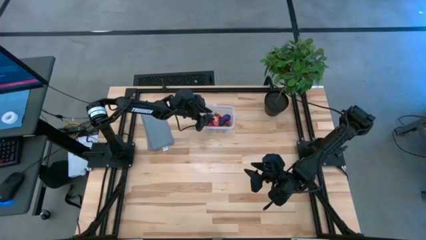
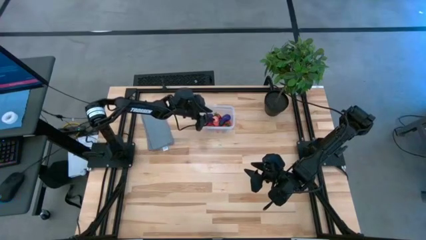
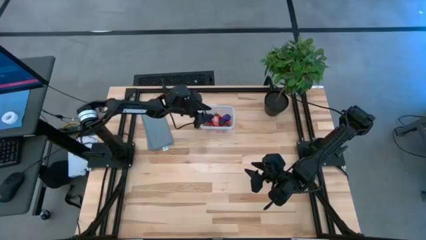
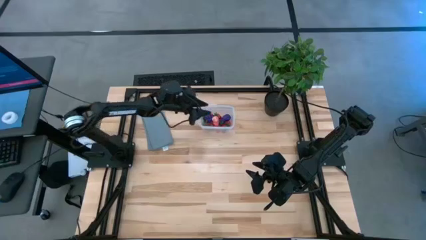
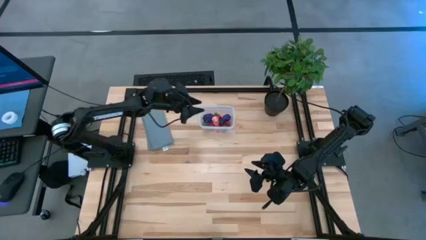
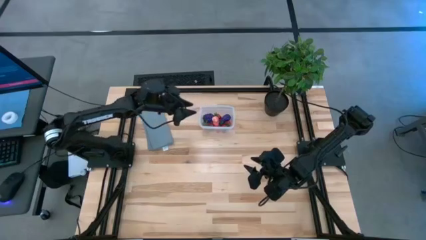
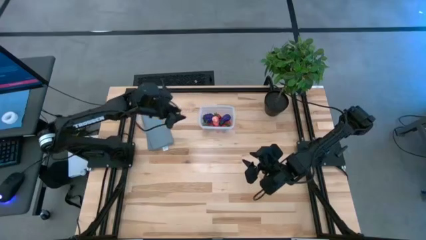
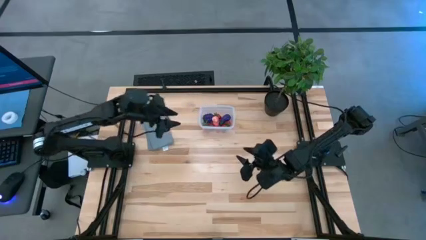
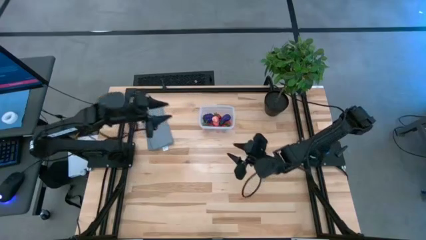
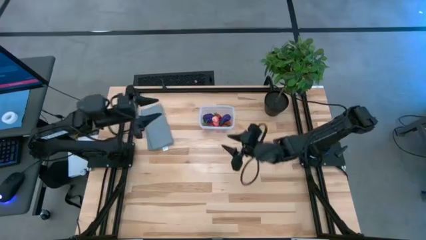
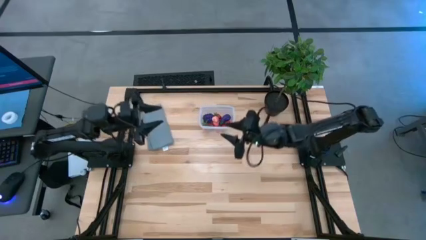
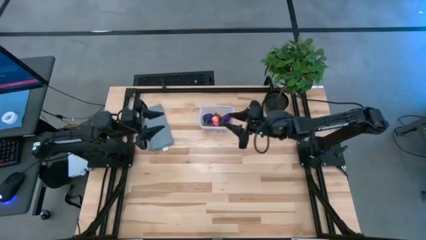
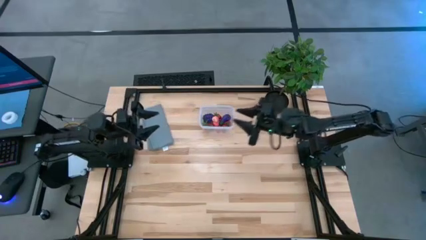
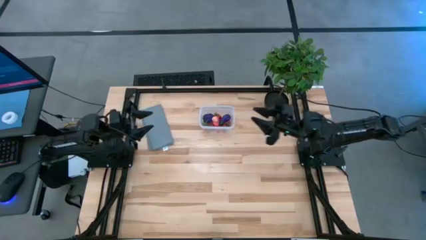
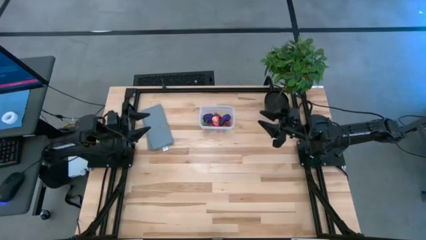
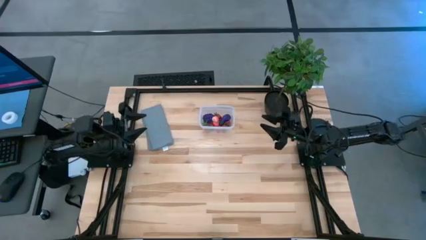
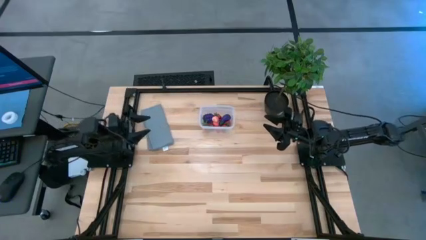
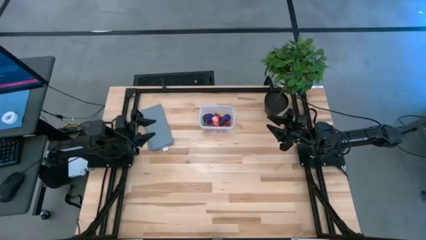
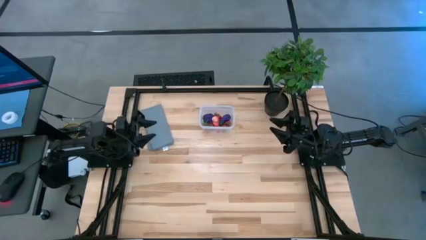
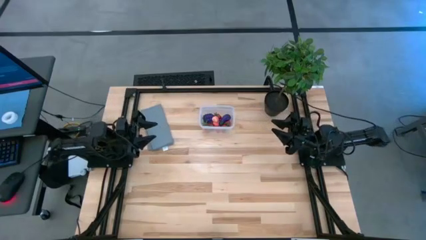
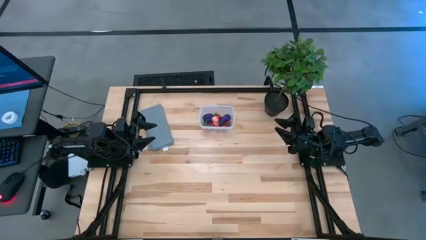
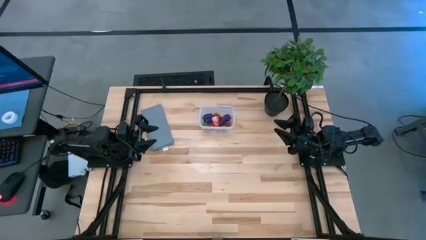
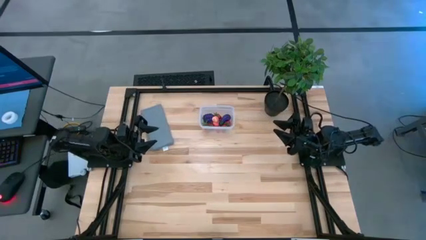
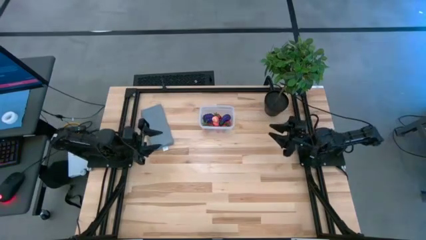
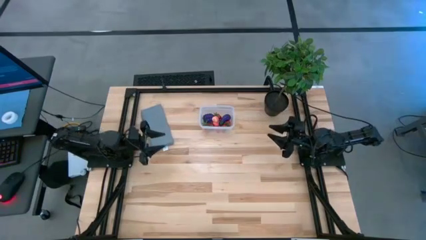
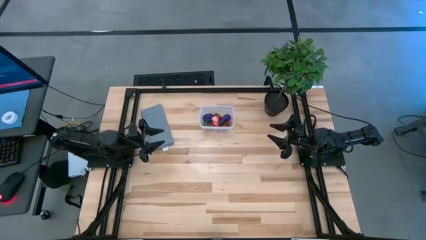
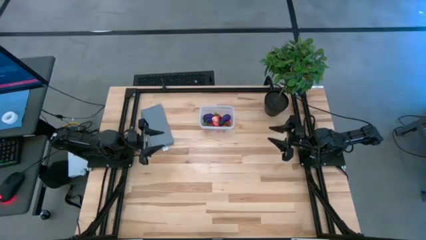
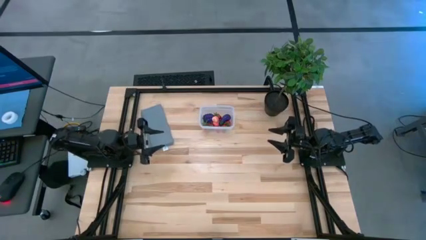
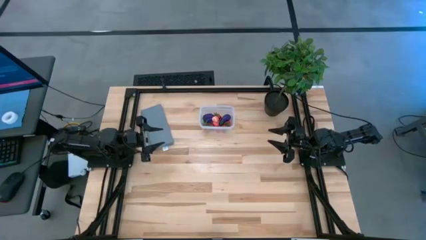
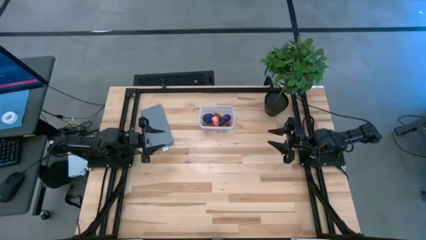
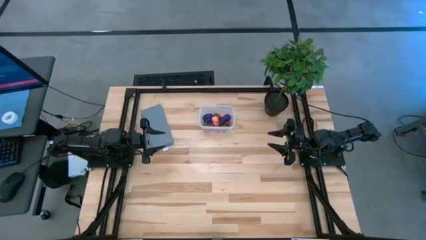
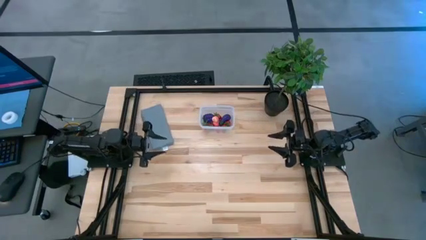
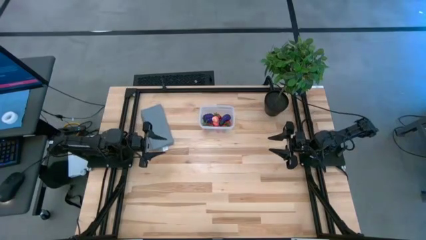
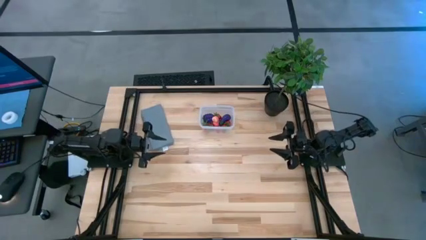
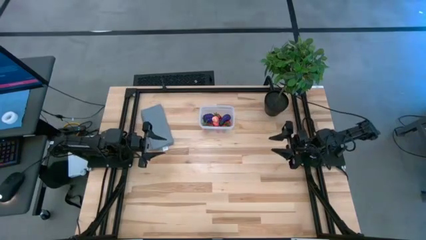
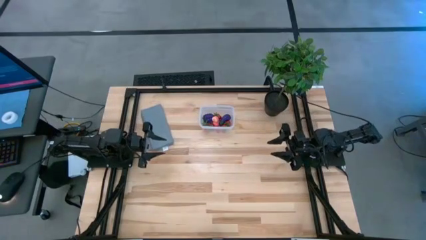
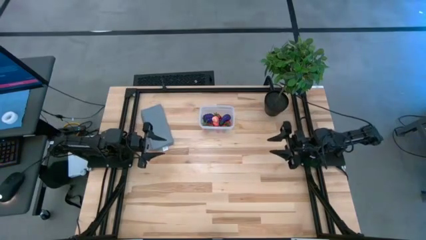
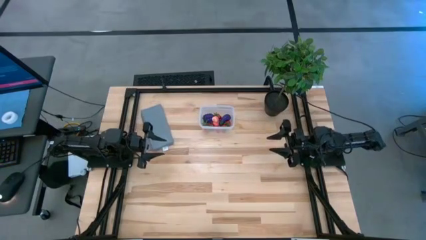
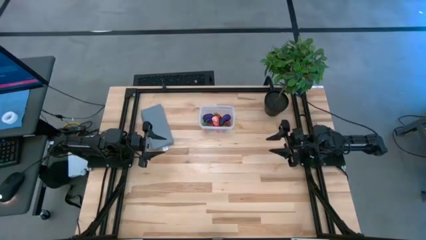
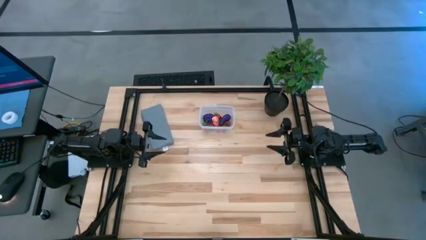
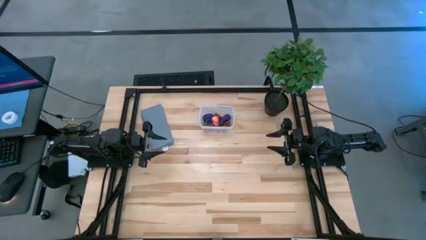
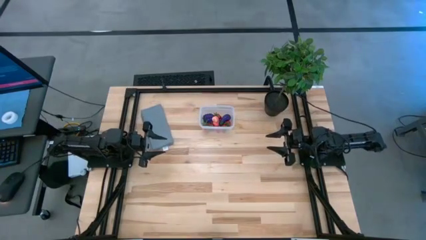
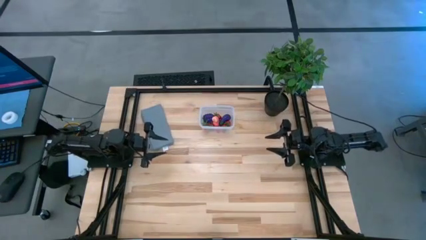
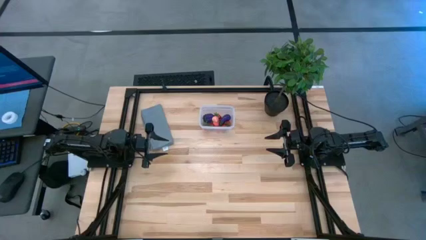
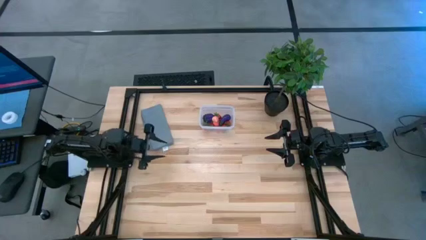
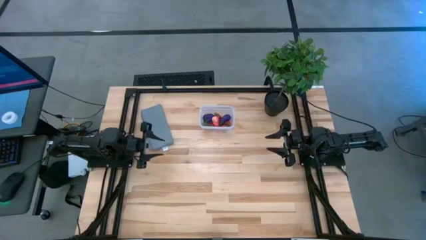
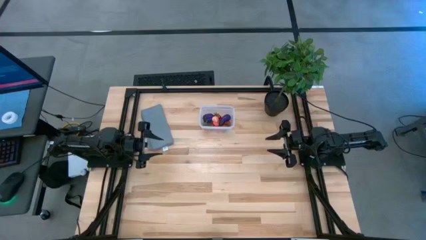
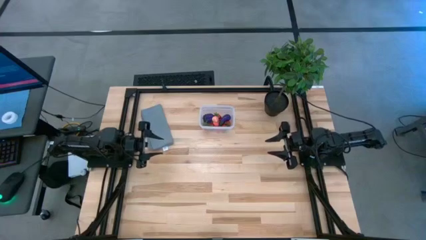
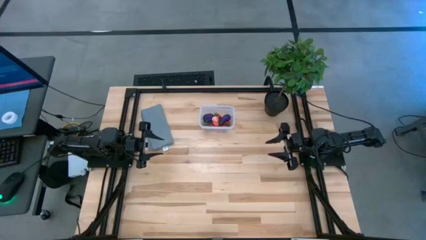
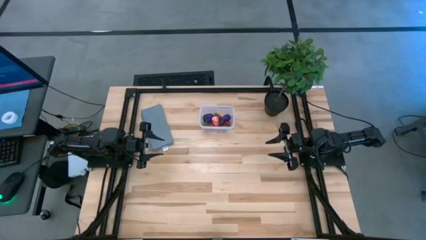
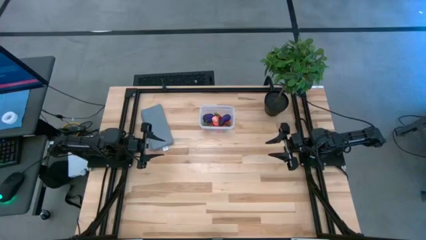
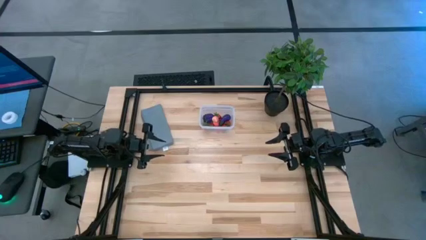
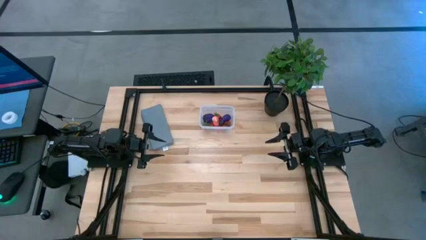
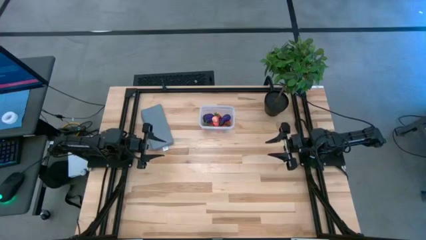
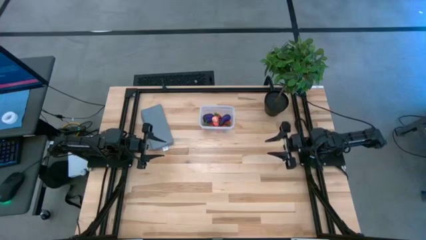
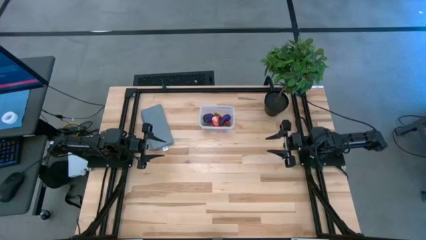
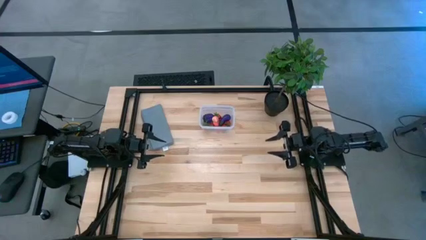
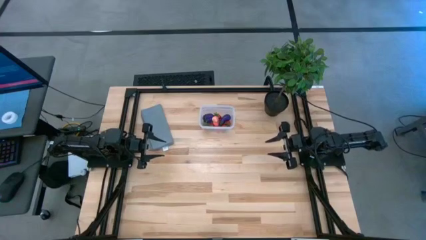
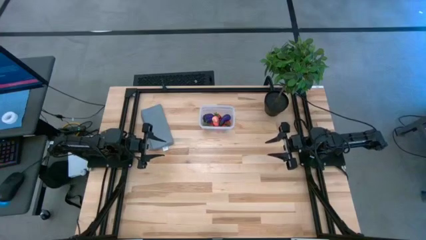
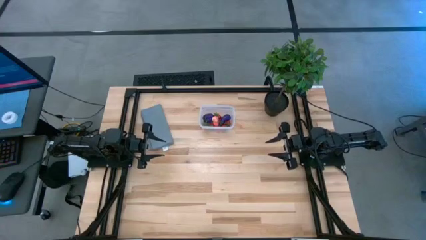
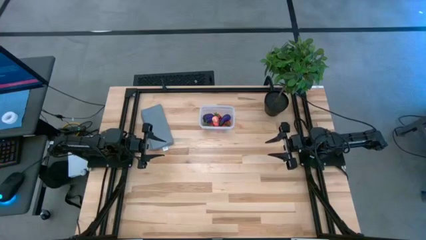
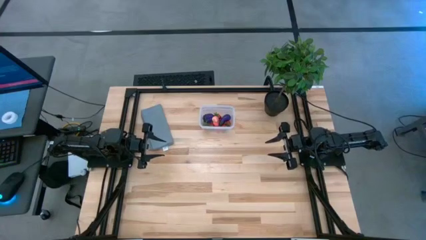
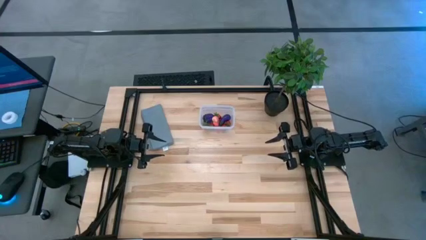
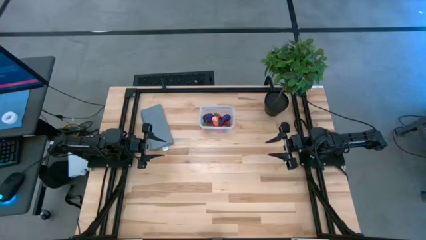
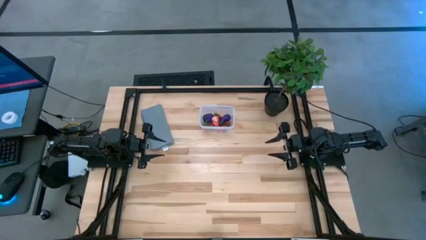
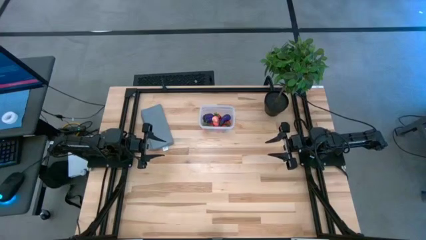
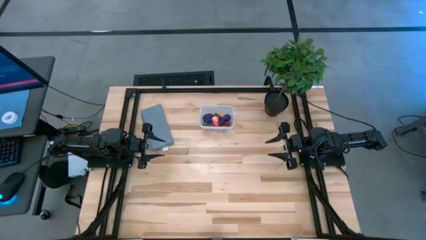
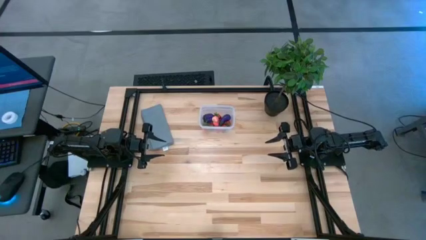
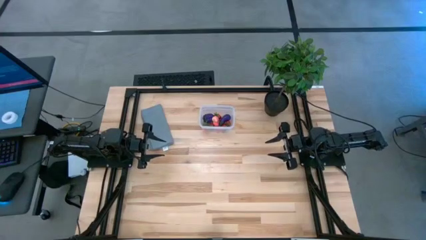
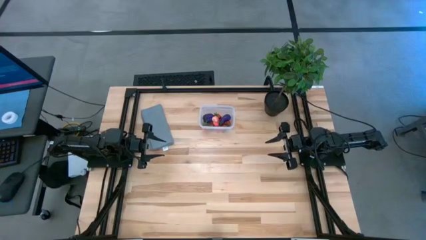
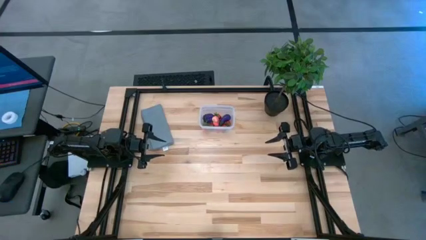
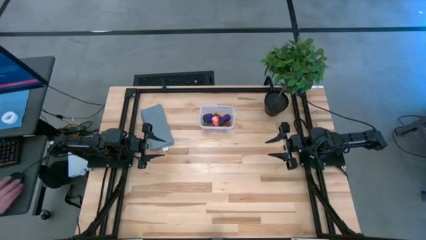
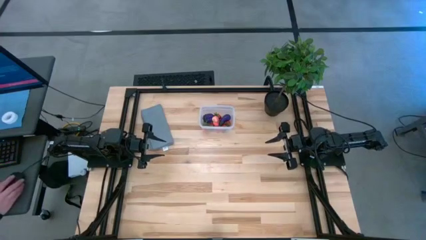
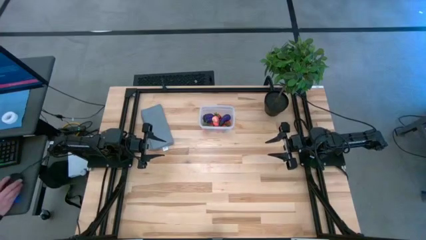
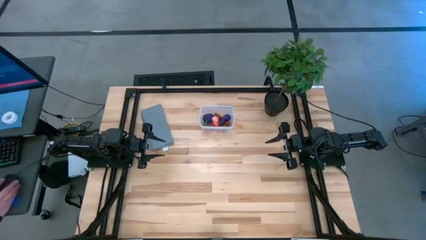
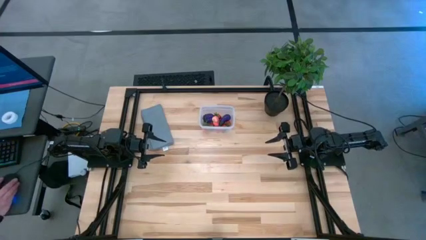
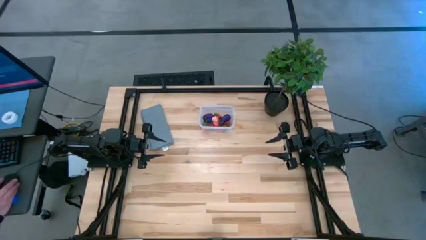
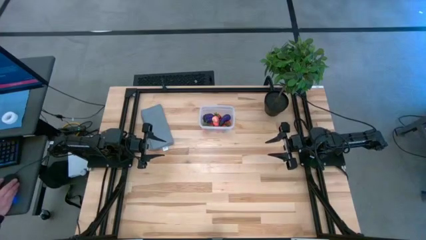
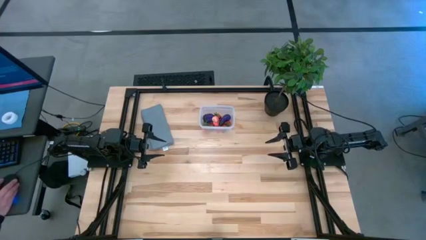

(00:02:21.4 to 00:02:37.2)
Task: Pick and placing Produce into tupperware
Return to Home Position

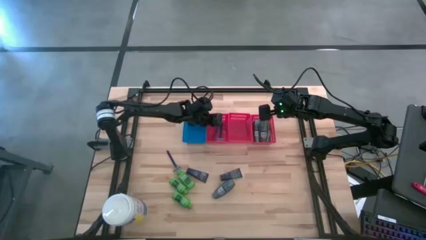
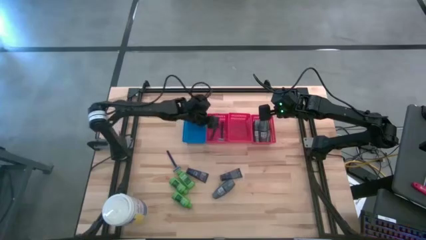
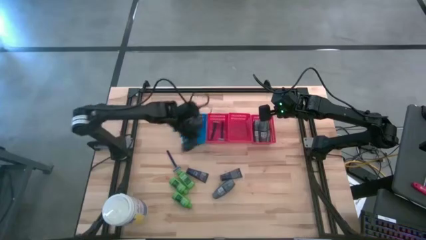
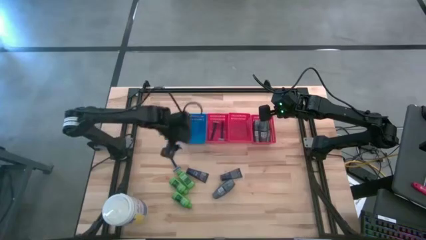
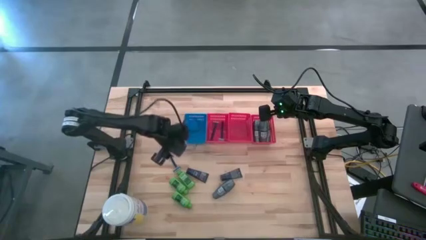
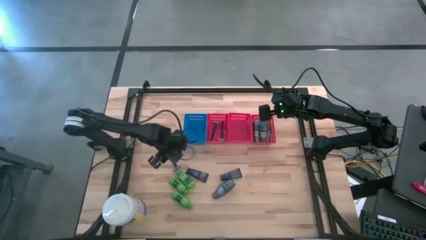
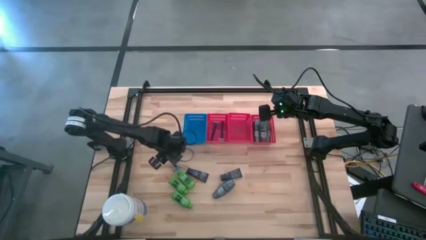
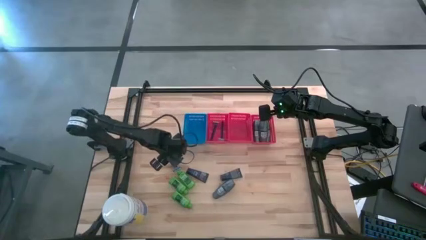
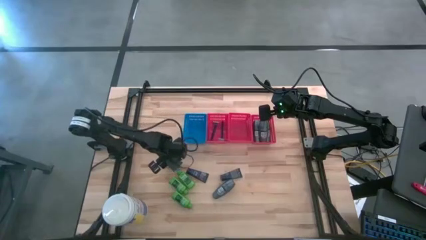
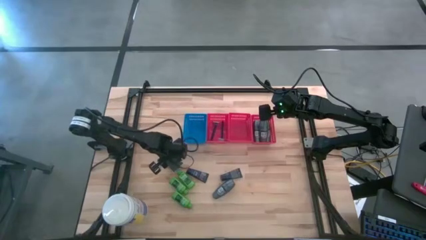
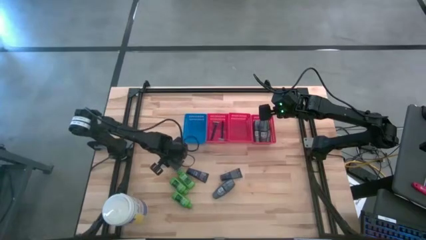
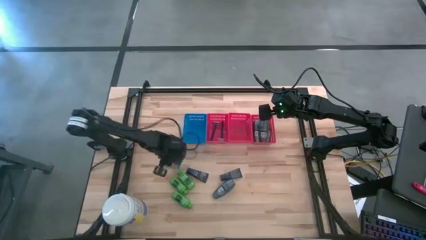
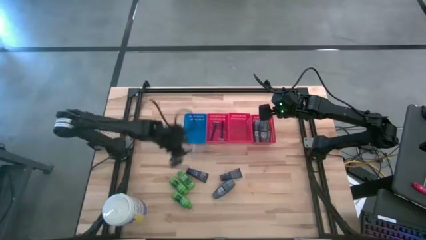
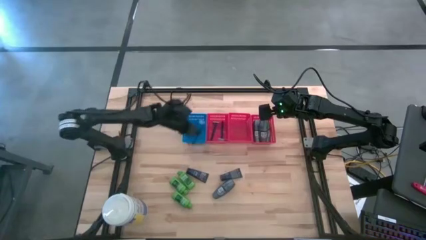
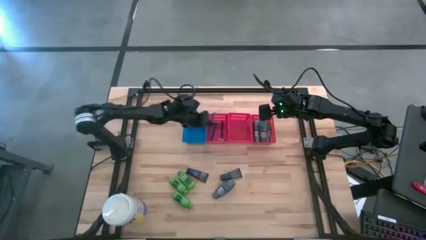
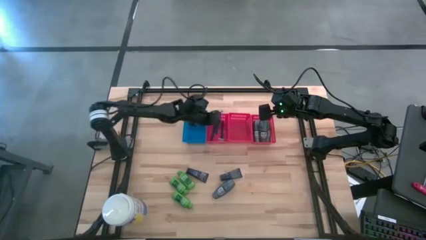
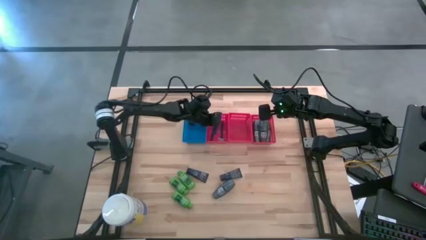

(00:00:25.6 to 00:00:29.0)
Task: Pick & Place Travel size toiletries
Put the blue razor into the left red bin
